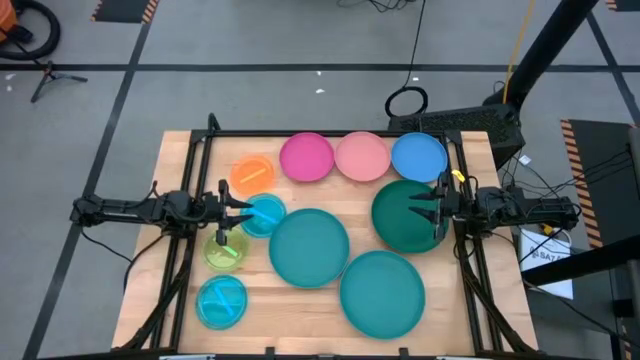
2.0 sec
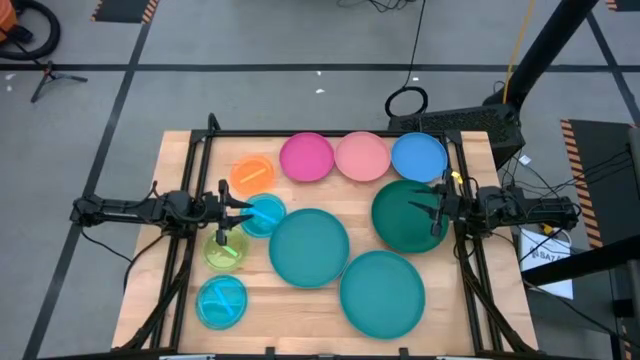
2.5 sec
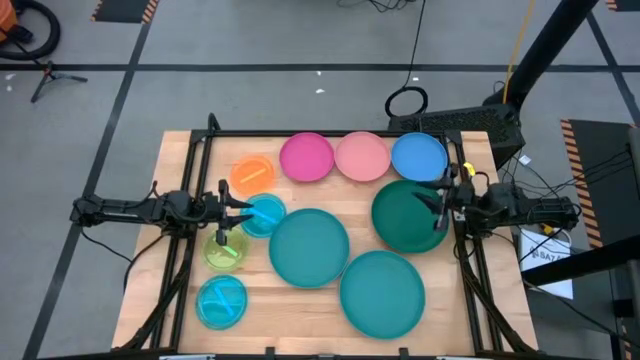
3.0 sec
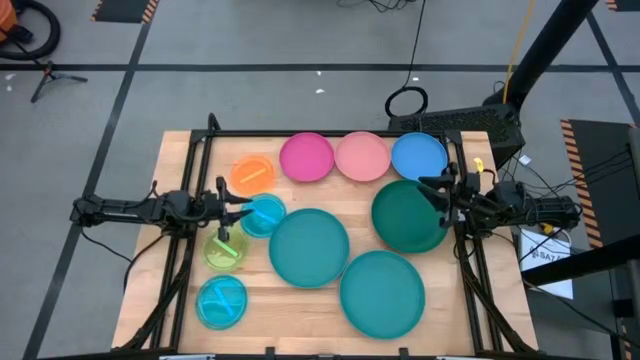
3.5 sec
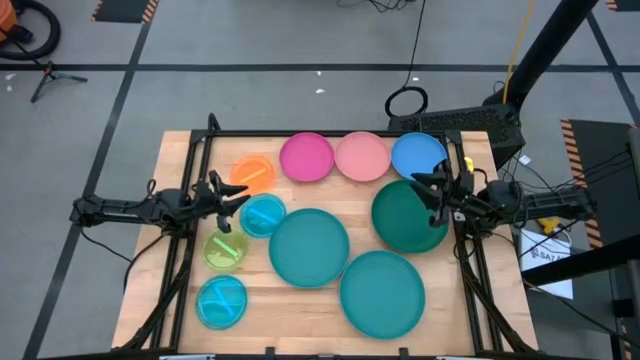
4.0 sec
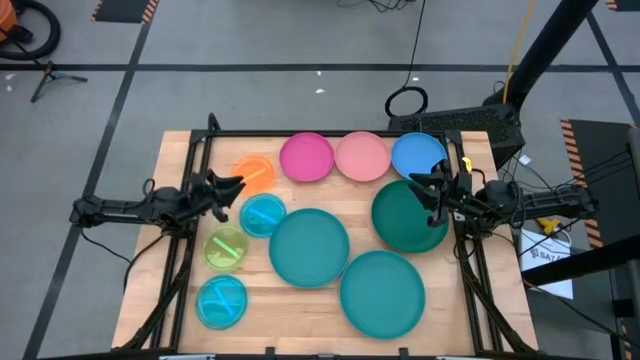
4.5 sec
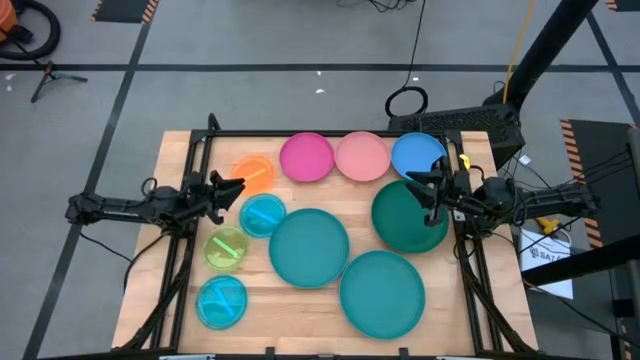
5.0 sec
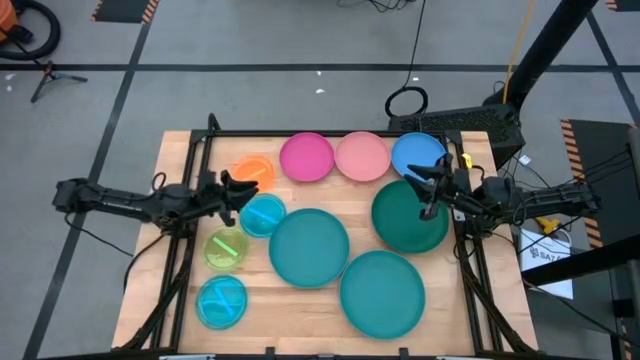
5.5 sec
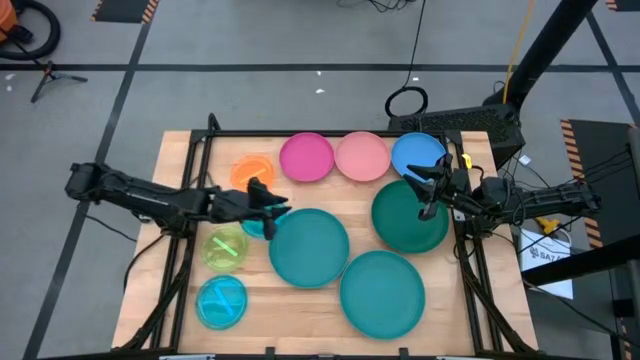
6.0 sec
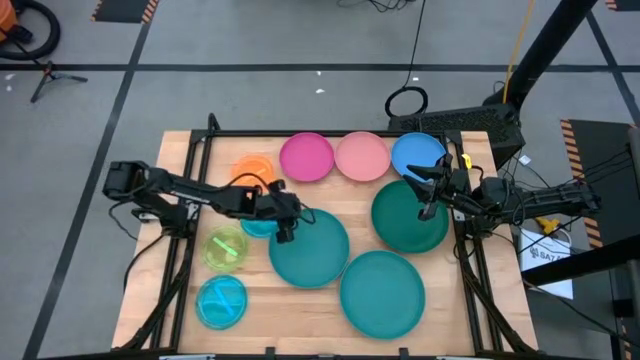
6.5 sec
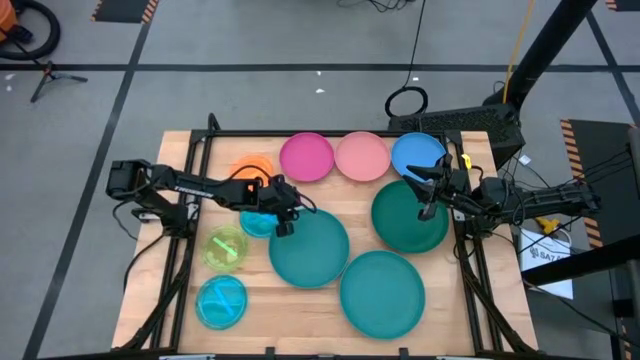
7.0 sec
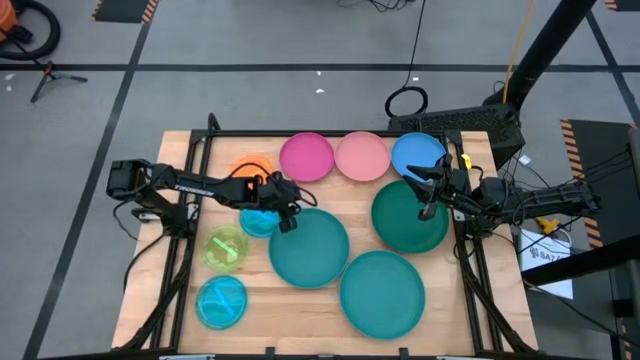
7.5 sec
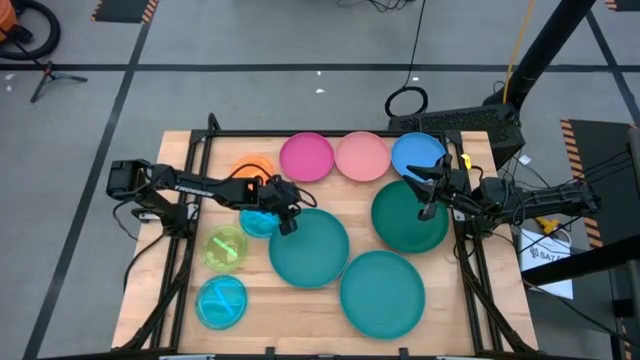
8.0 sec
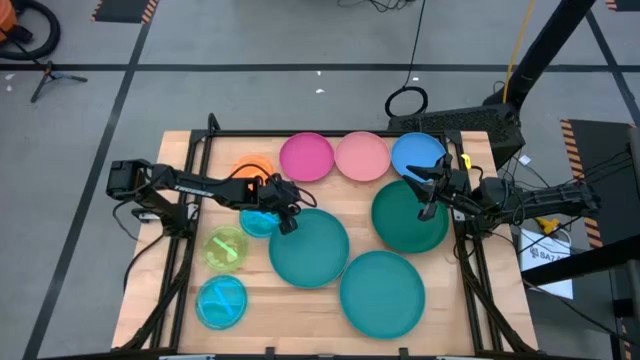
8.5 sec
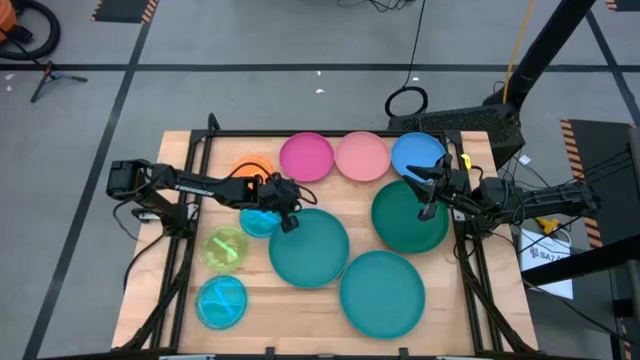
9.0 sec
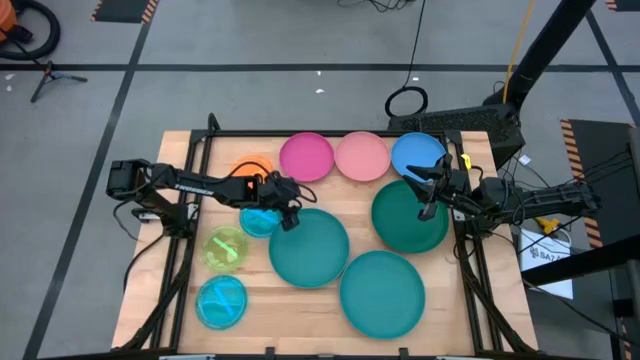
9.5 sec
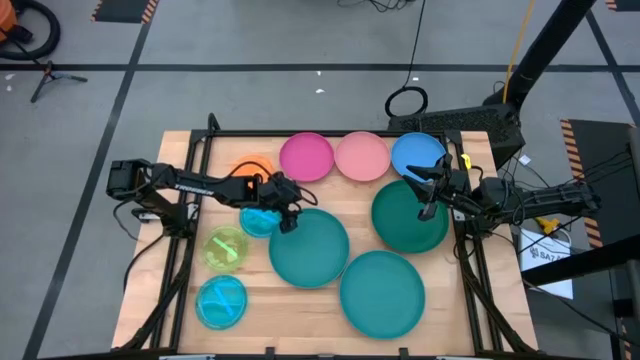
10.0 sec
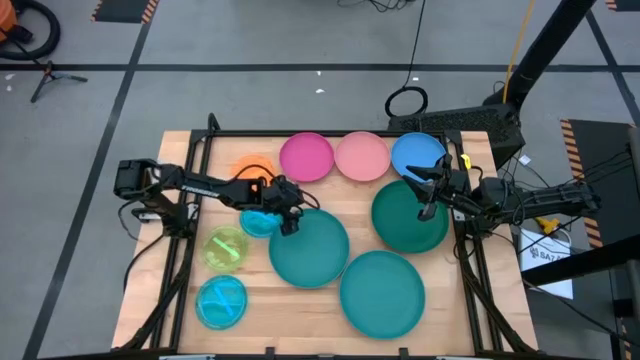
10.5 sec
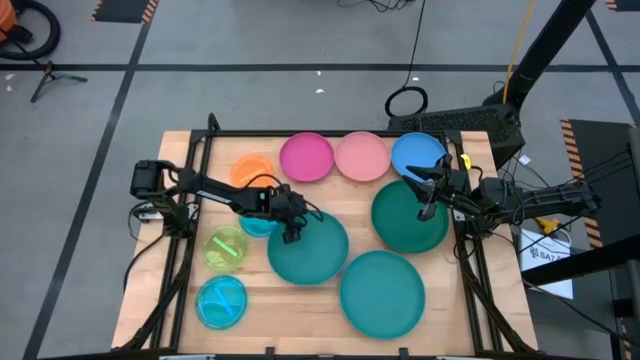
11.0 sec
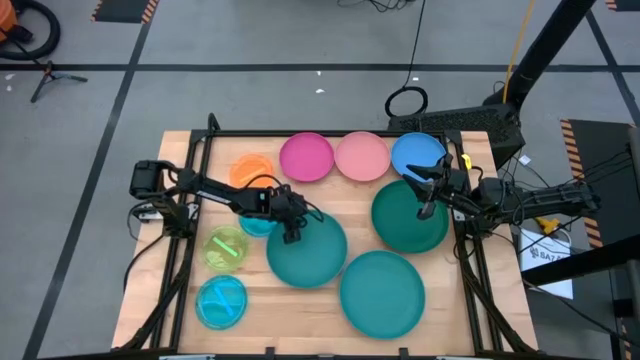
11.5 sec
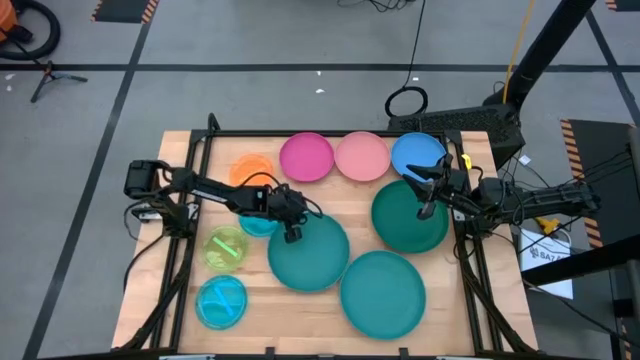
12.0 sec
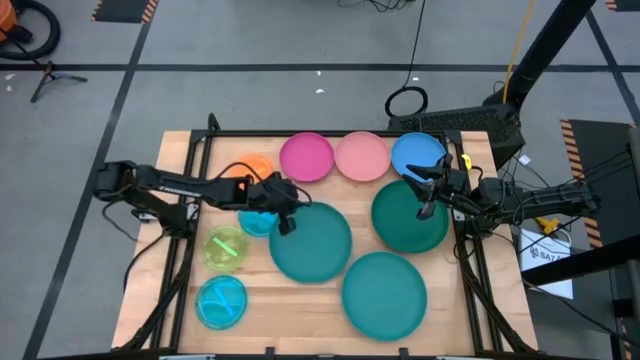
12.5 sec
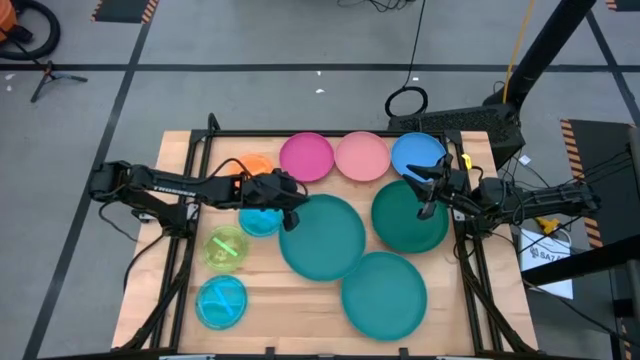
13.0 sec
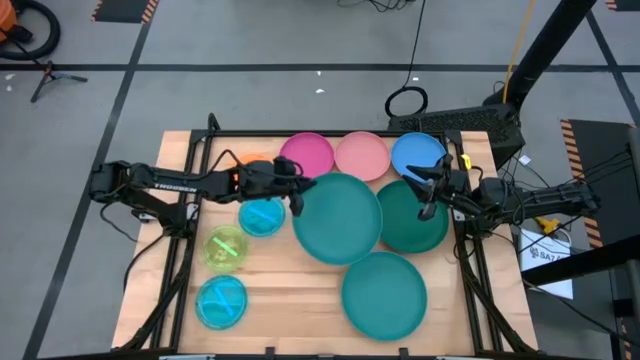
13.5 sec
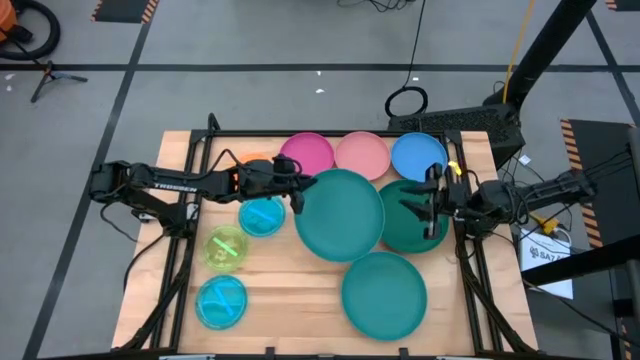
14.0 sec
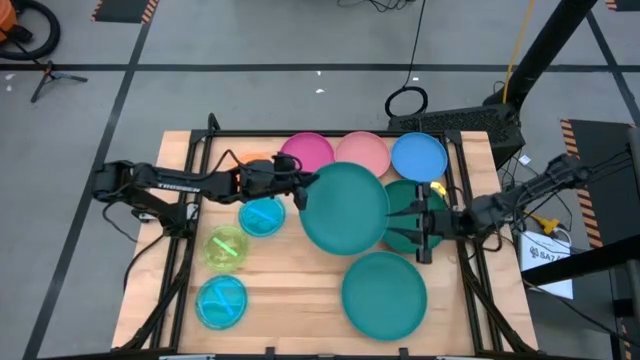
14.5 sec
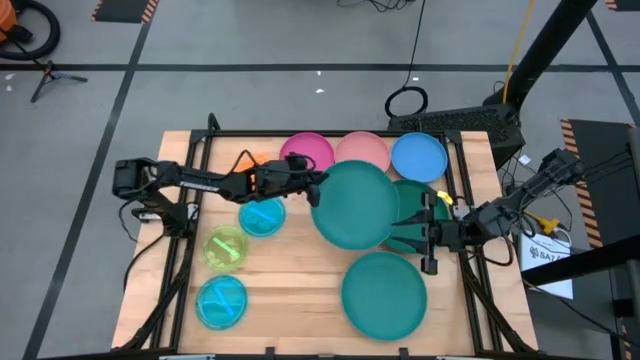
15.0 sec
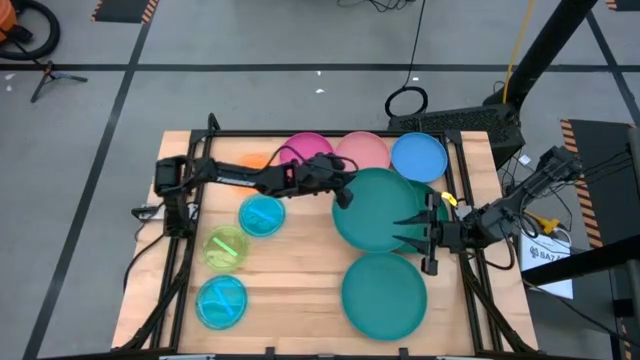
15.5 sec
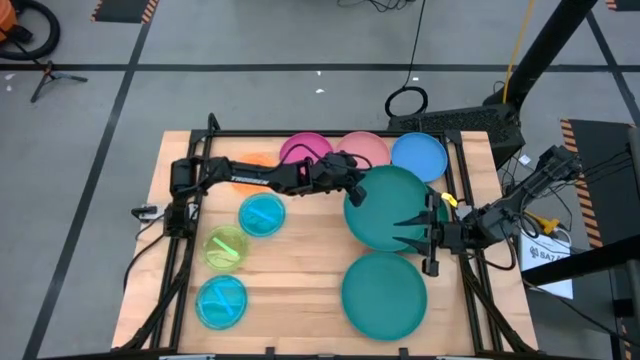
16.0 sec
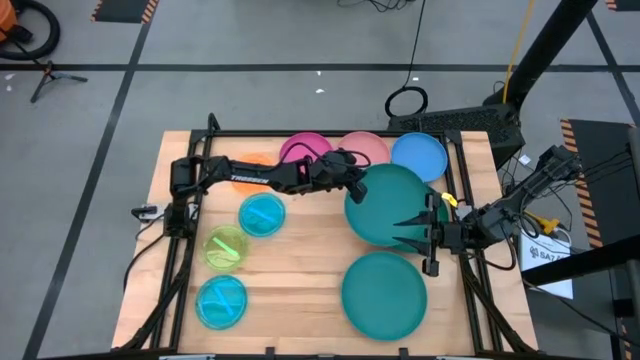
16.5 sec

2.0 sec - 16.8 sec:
Task: Stack plastic plates
Stack the top dark blue plate on top of the green plate
